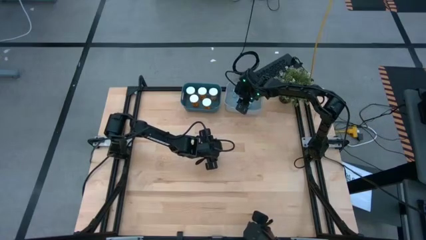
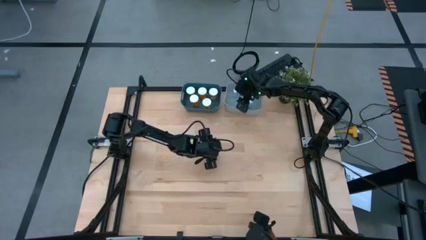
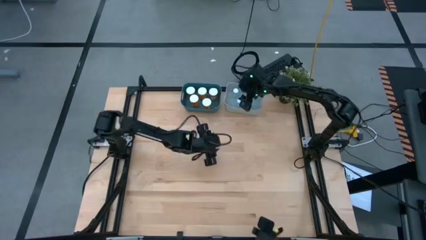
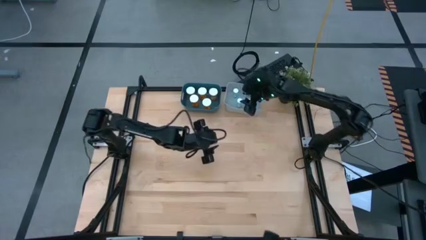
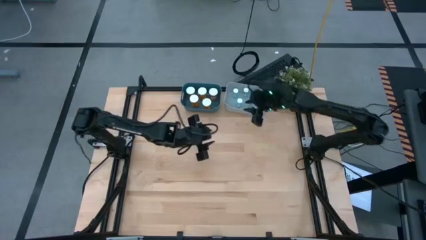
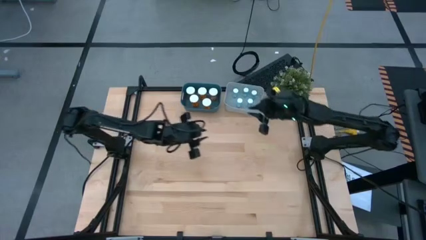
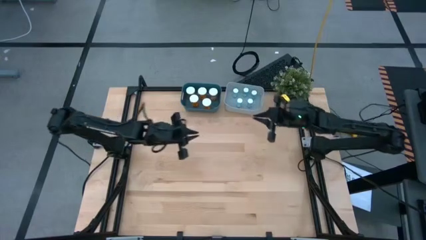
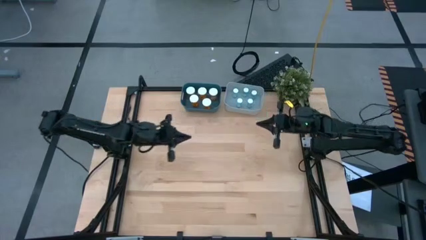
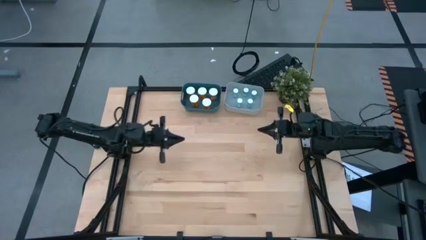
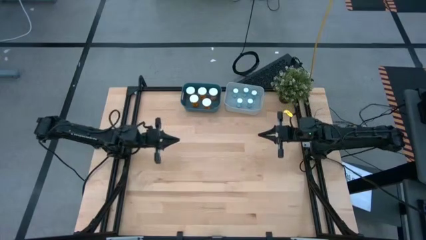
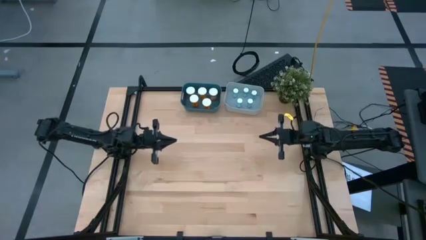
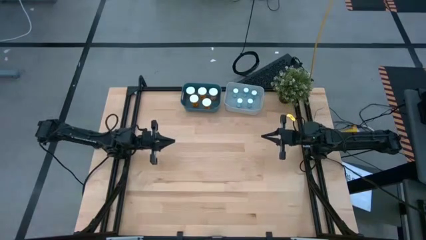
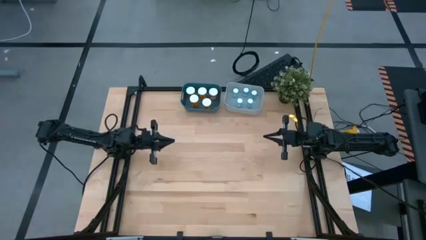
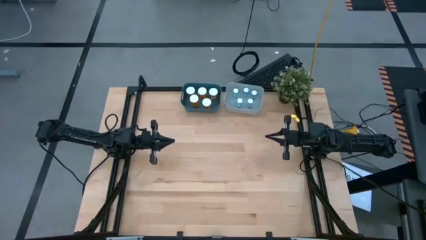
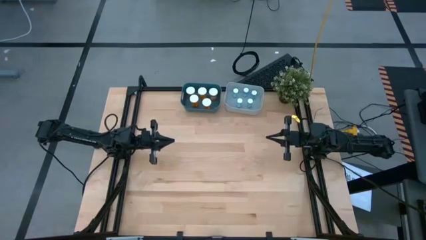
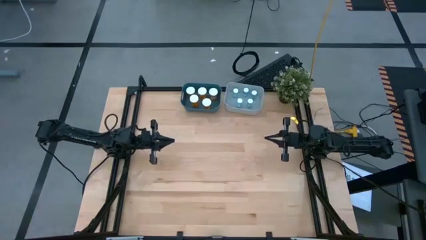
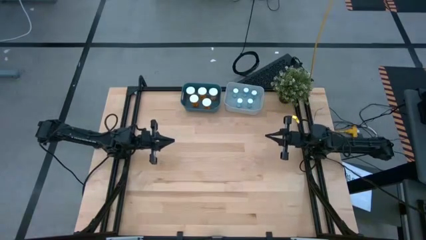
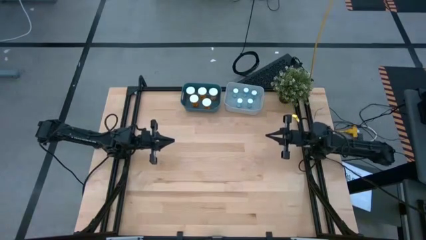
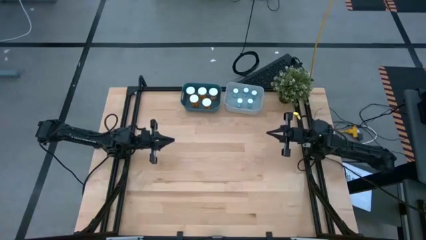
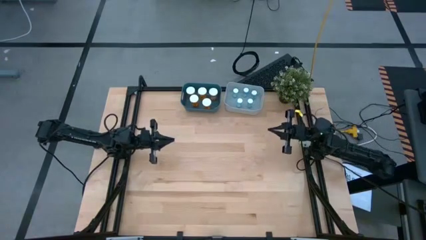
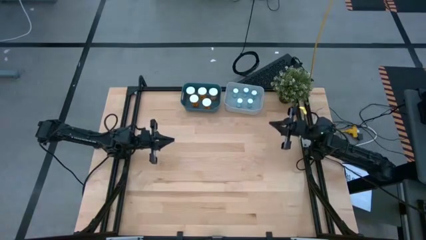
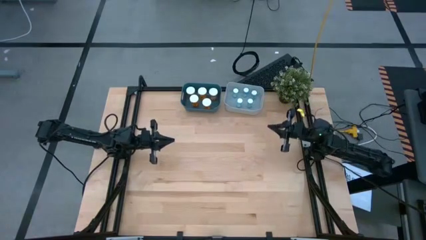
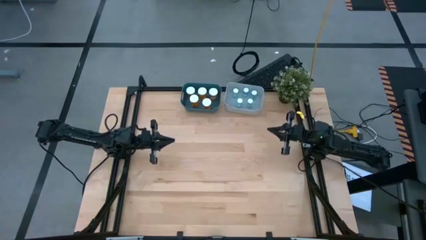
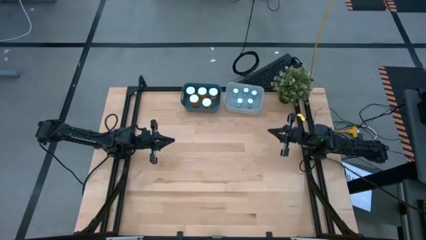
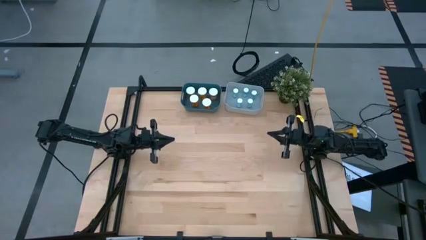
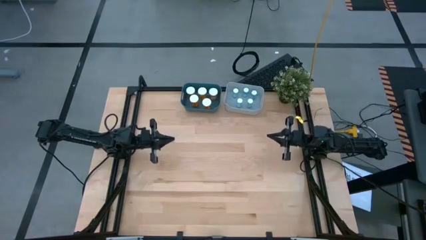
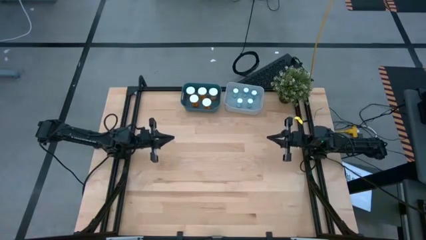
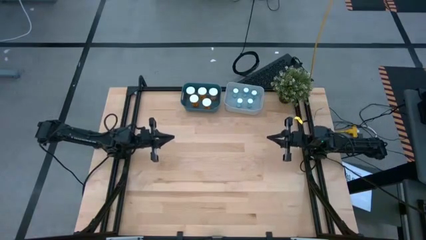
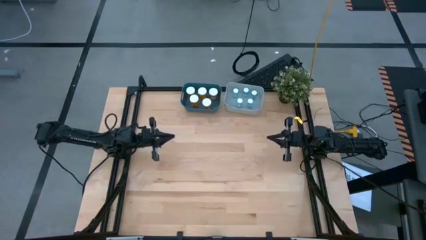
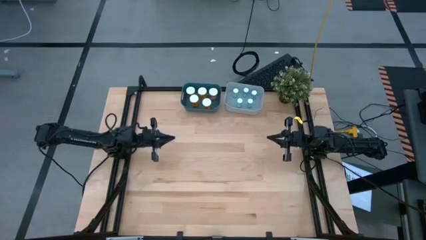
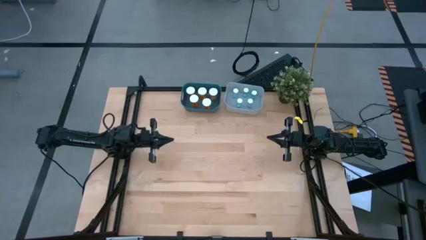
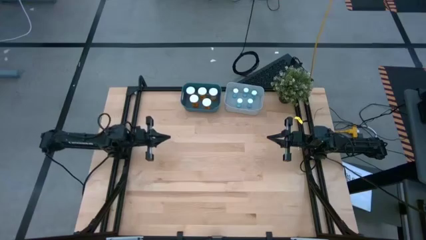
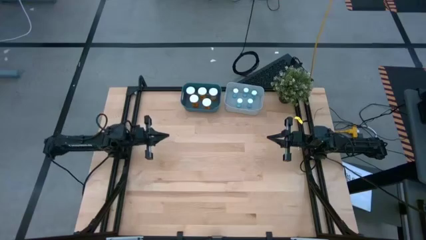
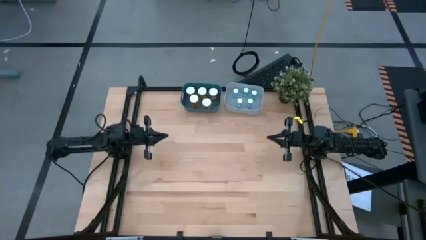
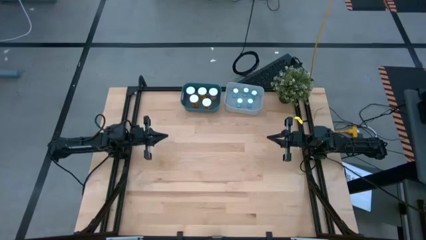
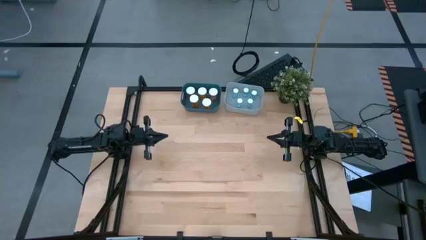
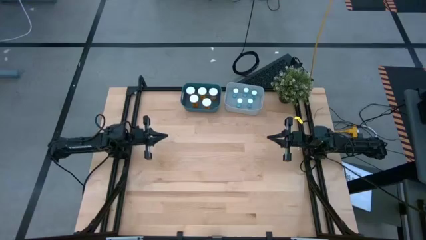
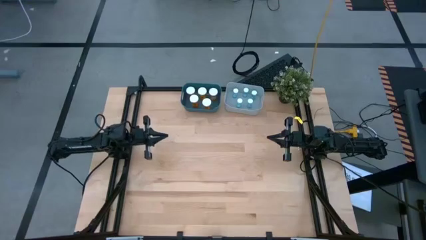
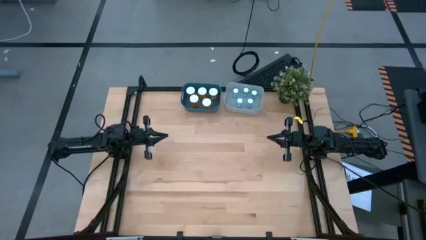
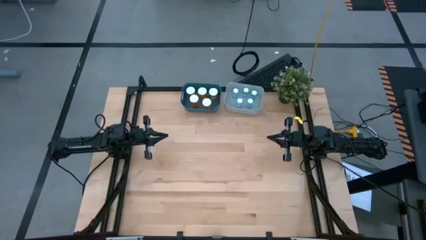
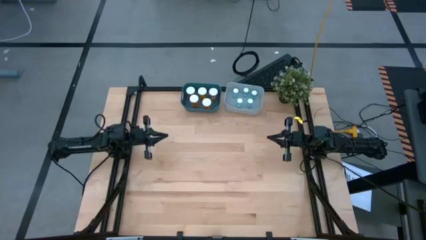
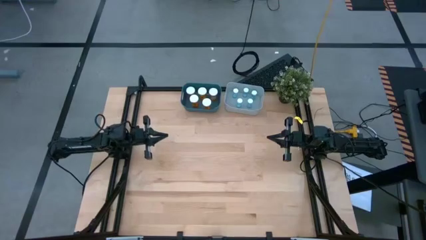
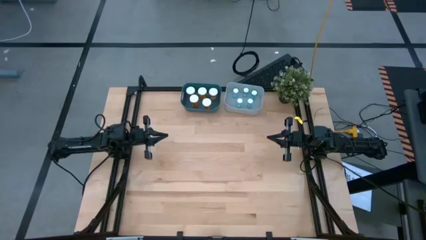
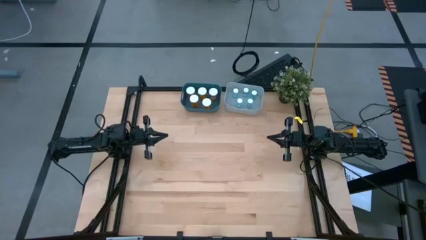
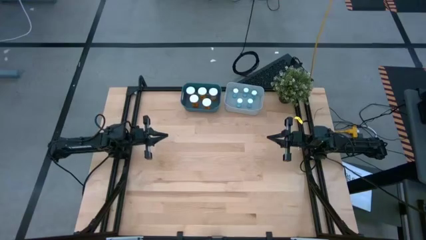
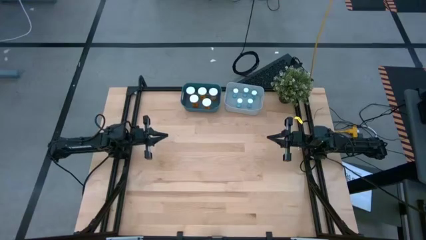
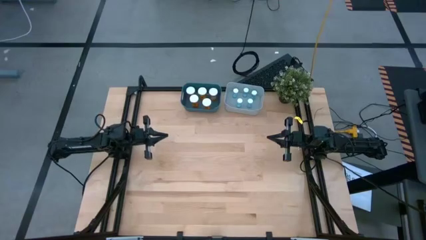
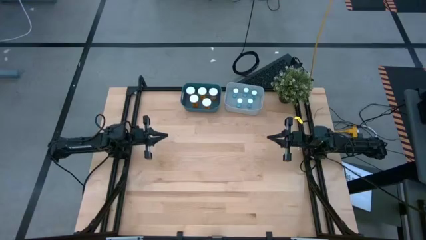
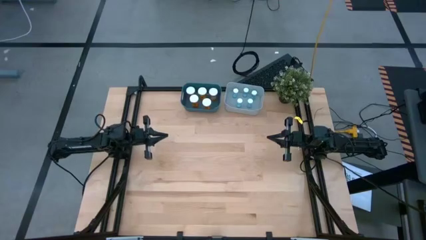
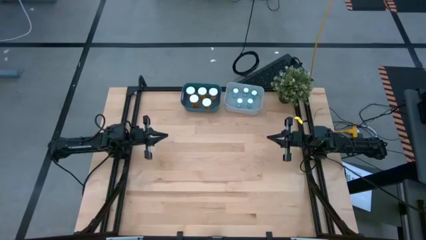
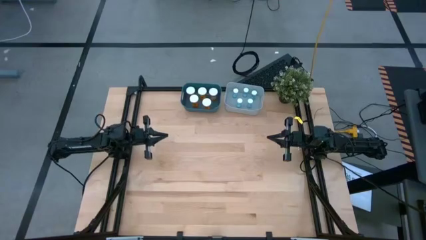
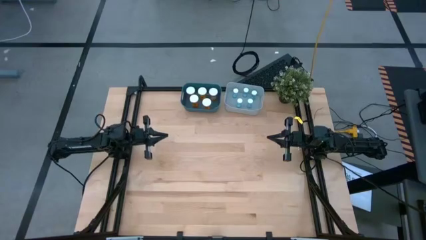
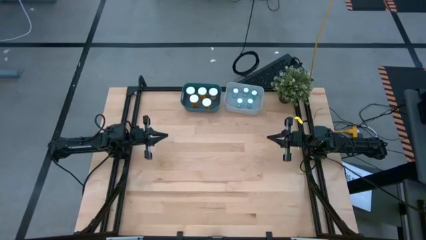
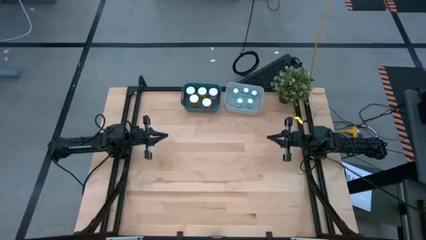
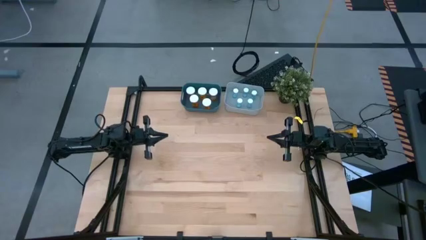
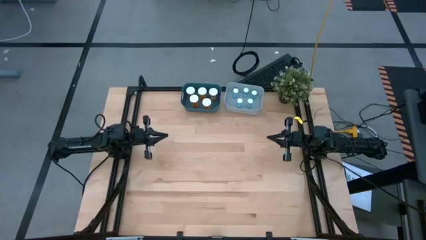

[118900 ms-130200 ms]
Task: Pick and place medicine bottles into bin by pill shape (circle, oval)
Return to Home Position
